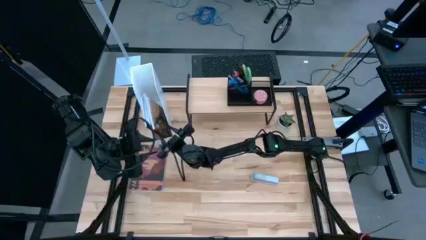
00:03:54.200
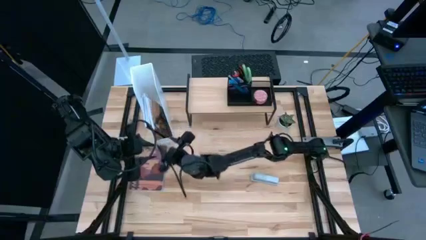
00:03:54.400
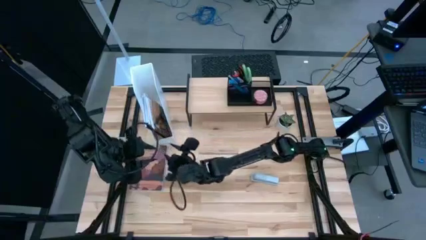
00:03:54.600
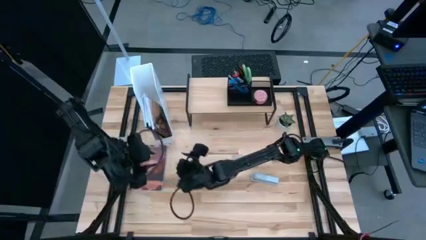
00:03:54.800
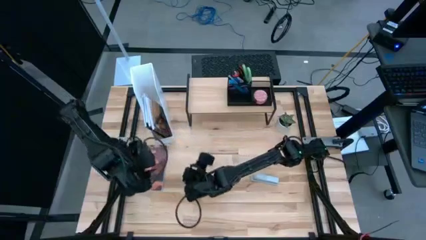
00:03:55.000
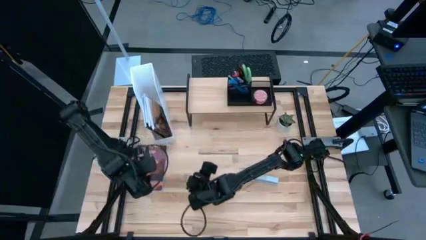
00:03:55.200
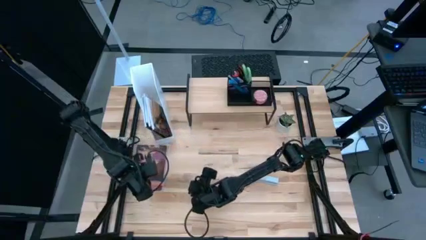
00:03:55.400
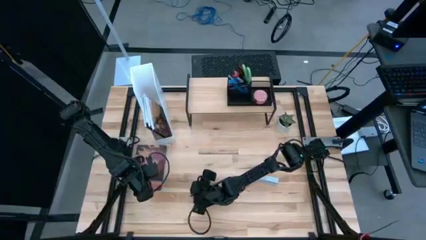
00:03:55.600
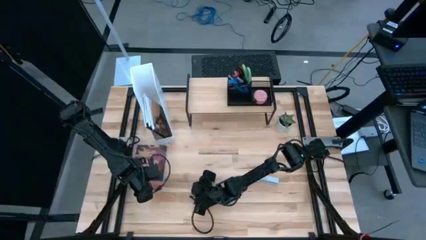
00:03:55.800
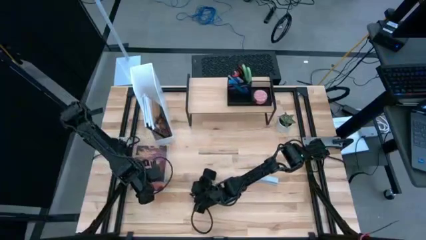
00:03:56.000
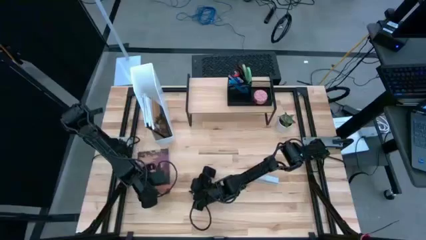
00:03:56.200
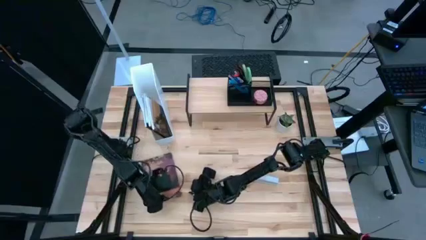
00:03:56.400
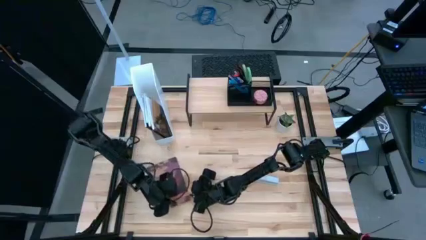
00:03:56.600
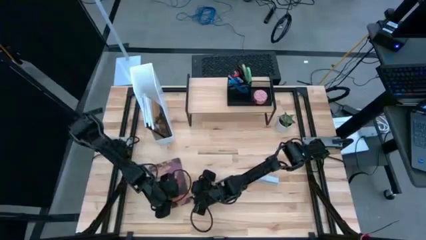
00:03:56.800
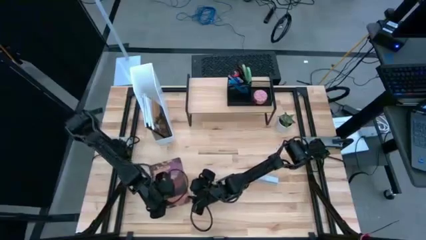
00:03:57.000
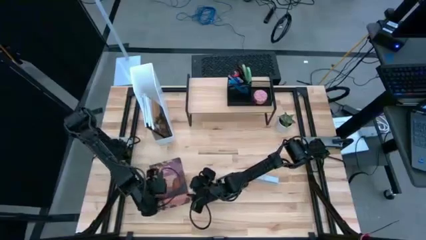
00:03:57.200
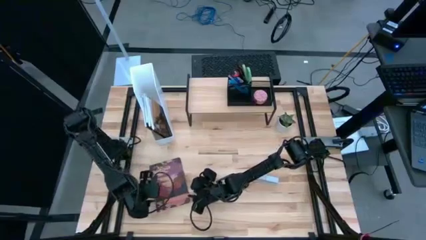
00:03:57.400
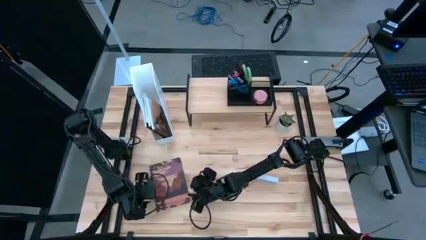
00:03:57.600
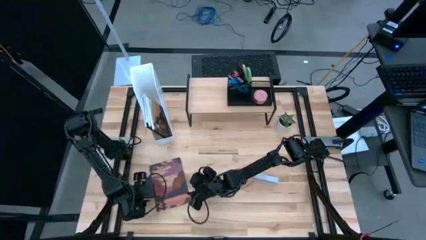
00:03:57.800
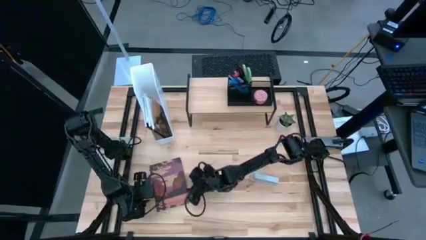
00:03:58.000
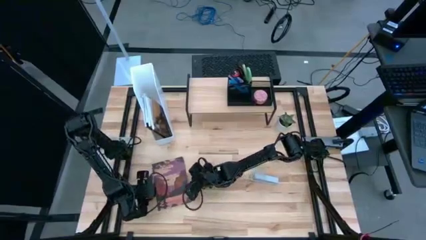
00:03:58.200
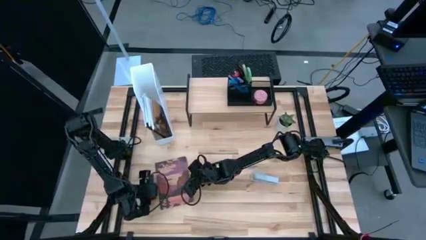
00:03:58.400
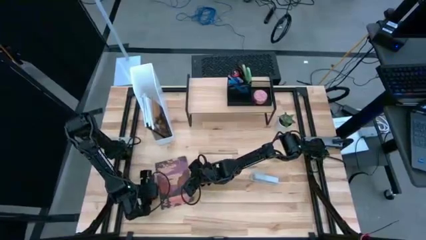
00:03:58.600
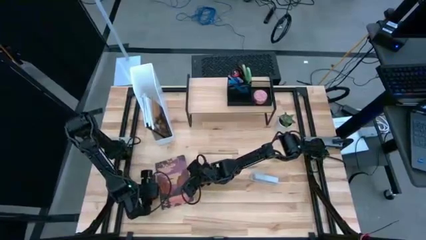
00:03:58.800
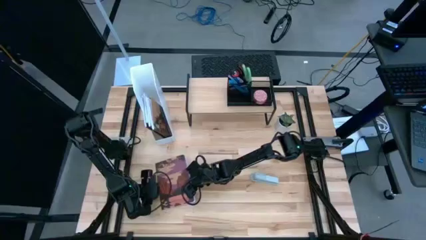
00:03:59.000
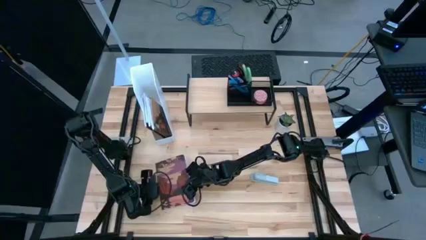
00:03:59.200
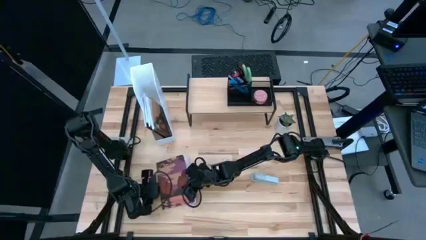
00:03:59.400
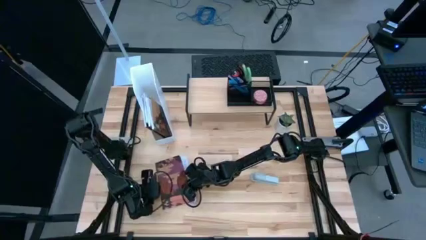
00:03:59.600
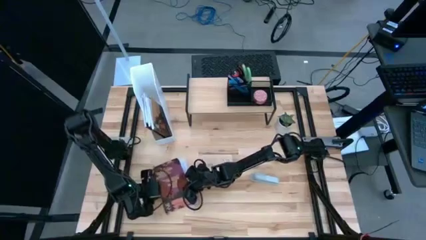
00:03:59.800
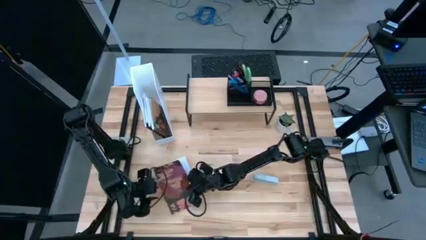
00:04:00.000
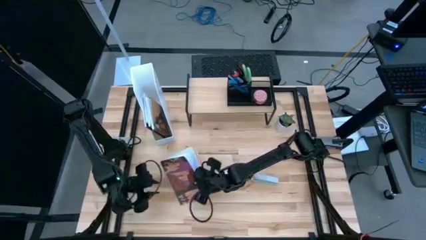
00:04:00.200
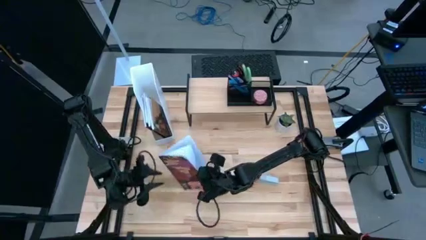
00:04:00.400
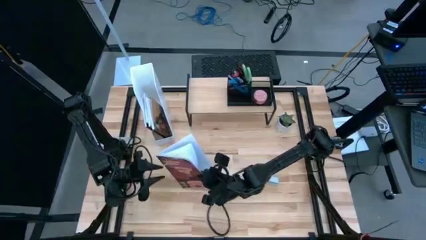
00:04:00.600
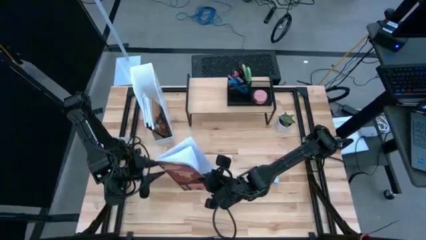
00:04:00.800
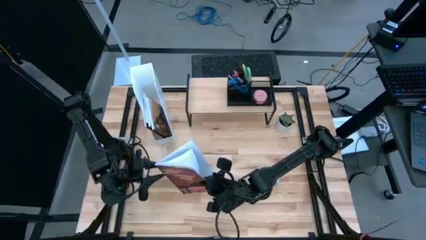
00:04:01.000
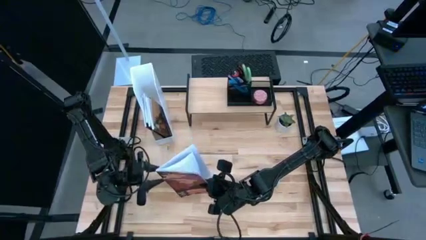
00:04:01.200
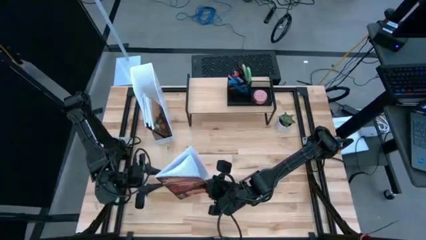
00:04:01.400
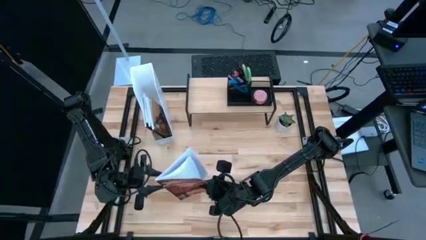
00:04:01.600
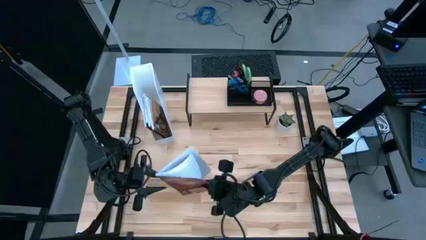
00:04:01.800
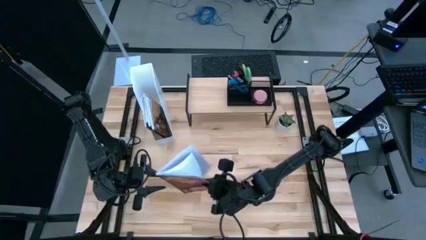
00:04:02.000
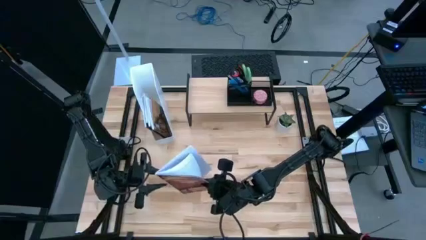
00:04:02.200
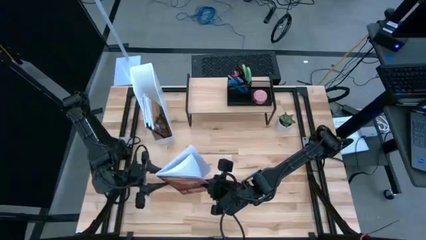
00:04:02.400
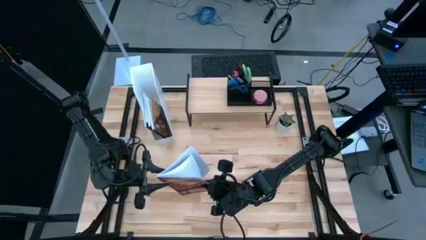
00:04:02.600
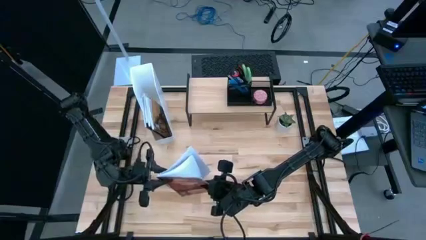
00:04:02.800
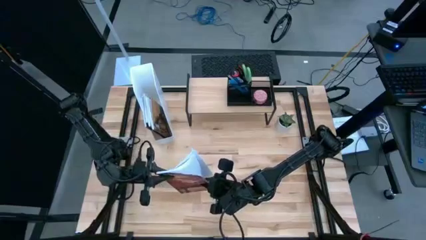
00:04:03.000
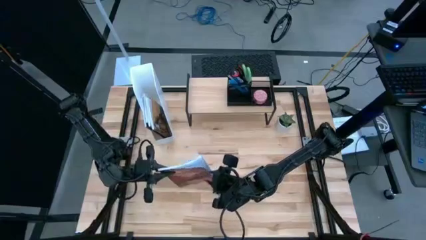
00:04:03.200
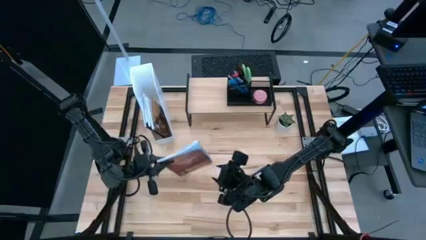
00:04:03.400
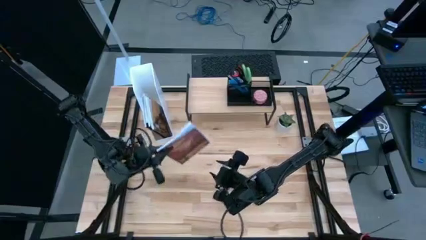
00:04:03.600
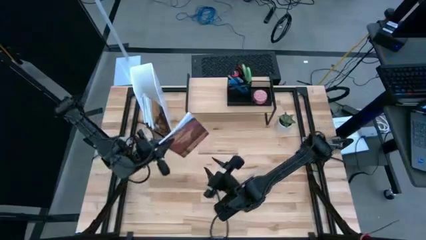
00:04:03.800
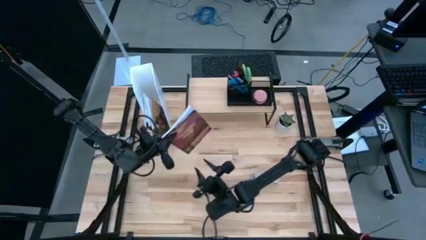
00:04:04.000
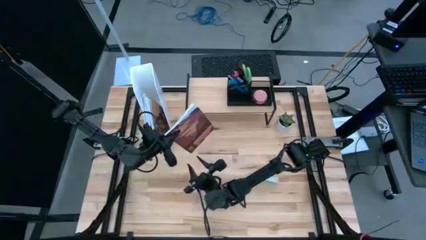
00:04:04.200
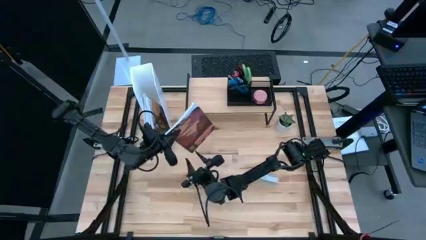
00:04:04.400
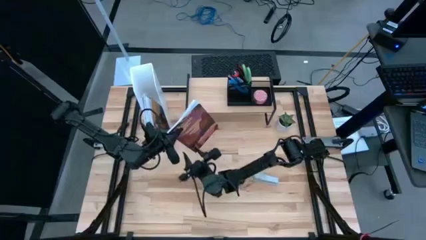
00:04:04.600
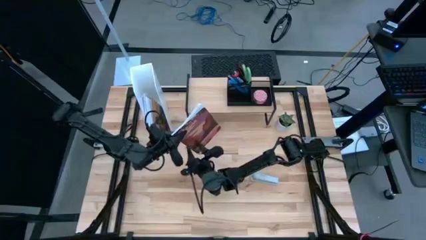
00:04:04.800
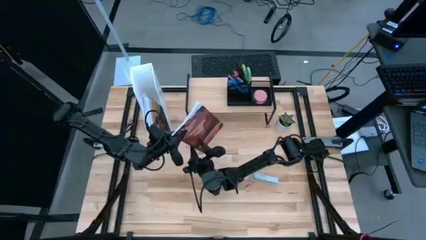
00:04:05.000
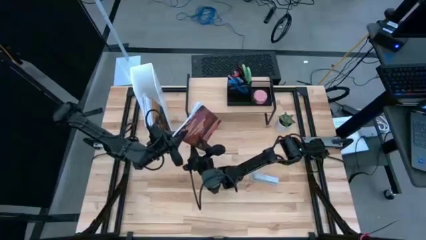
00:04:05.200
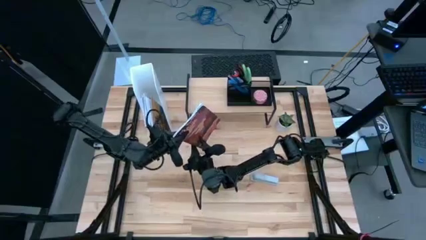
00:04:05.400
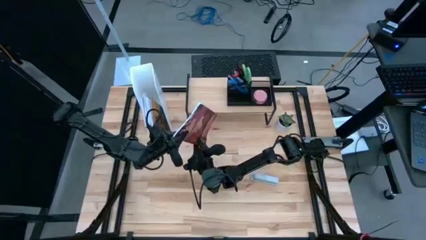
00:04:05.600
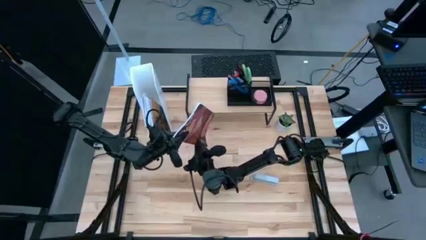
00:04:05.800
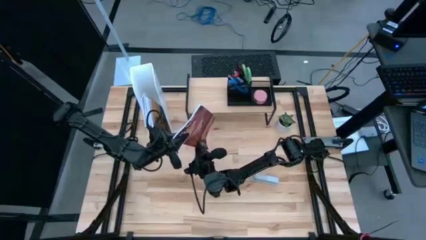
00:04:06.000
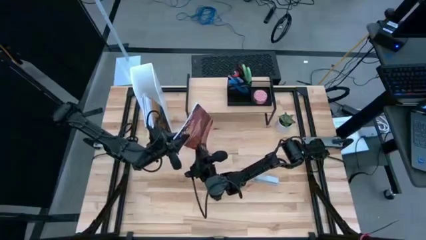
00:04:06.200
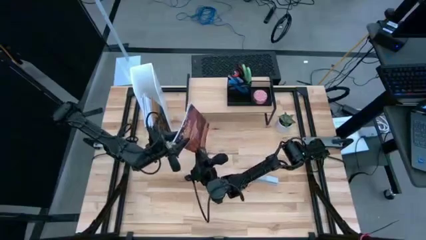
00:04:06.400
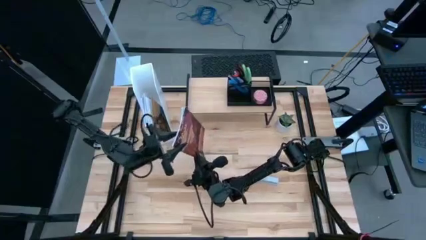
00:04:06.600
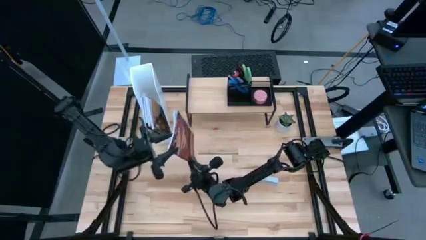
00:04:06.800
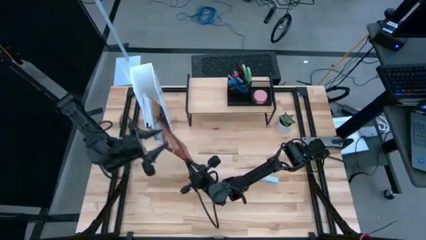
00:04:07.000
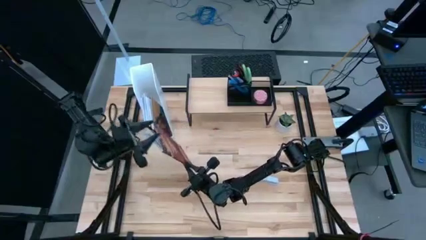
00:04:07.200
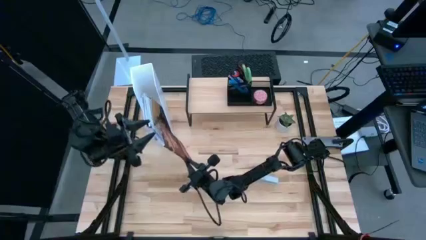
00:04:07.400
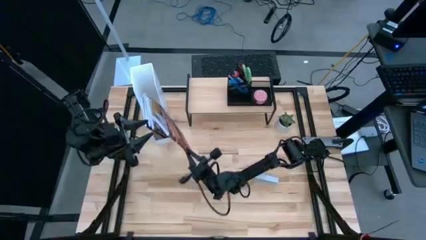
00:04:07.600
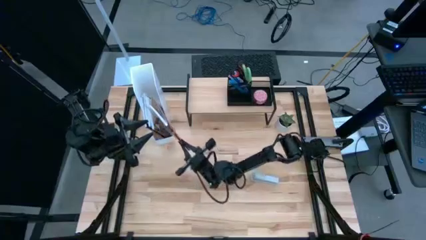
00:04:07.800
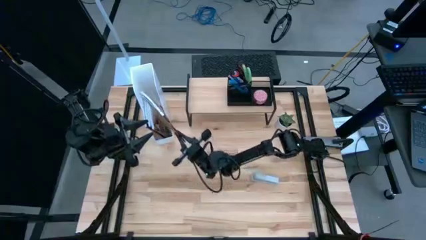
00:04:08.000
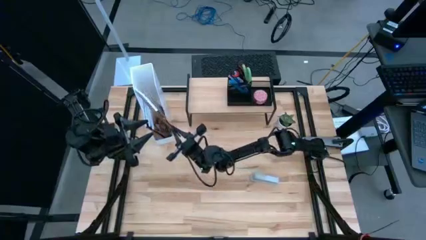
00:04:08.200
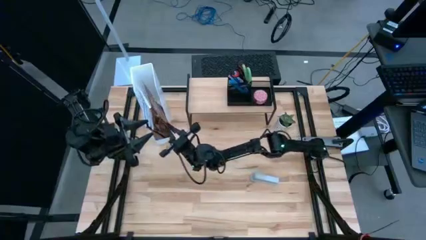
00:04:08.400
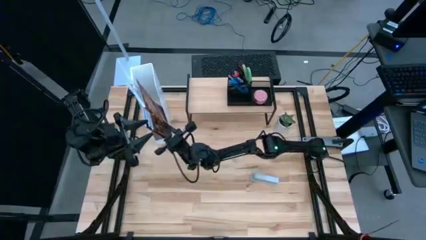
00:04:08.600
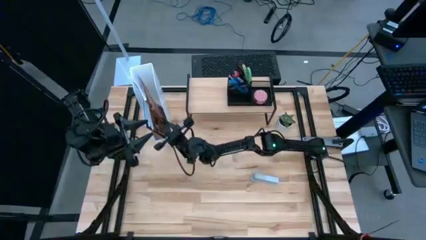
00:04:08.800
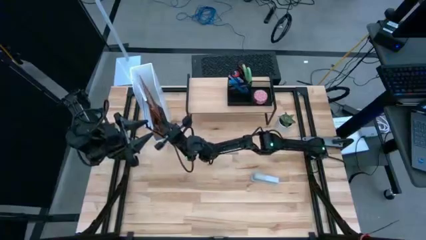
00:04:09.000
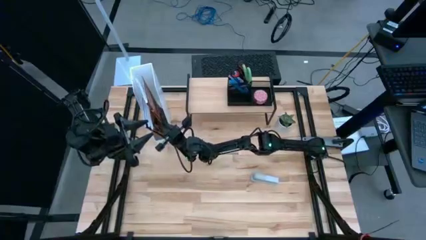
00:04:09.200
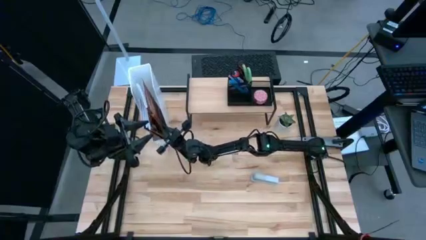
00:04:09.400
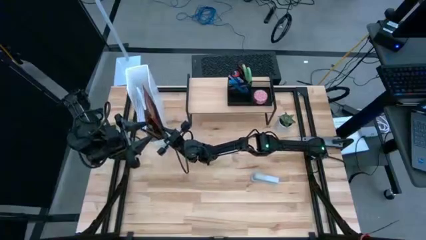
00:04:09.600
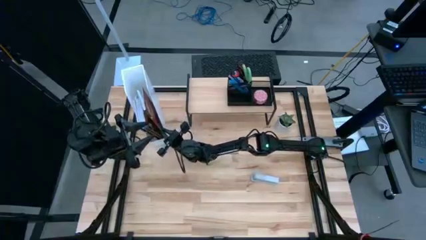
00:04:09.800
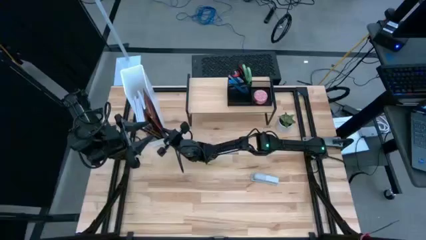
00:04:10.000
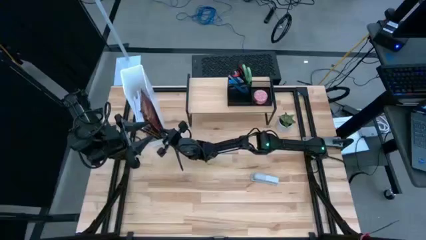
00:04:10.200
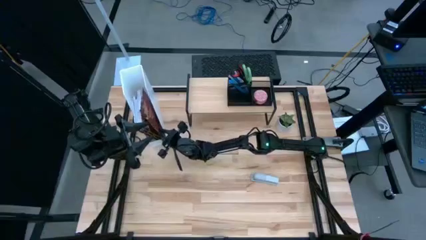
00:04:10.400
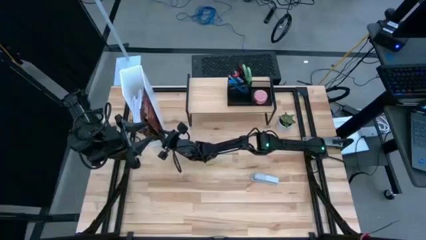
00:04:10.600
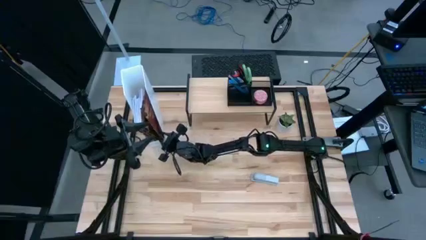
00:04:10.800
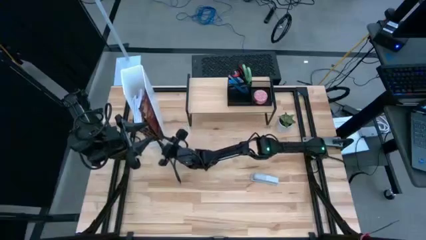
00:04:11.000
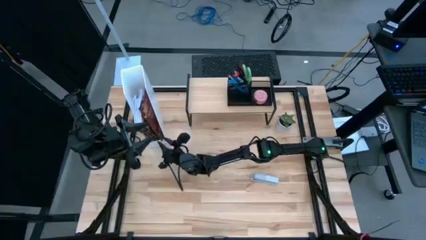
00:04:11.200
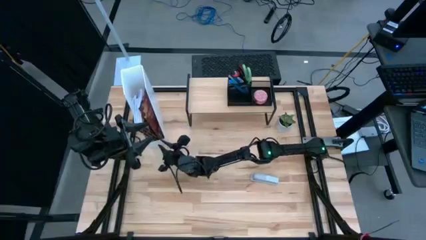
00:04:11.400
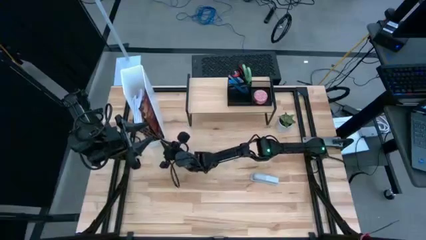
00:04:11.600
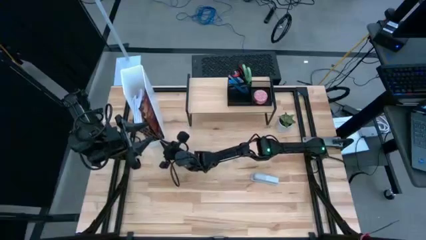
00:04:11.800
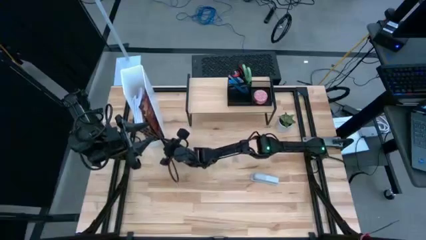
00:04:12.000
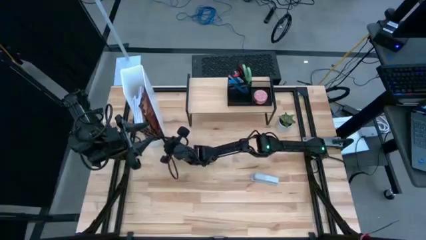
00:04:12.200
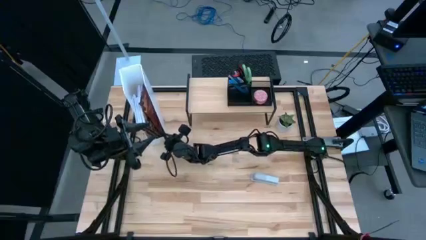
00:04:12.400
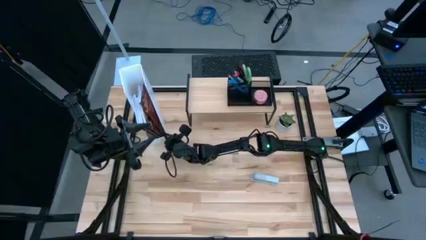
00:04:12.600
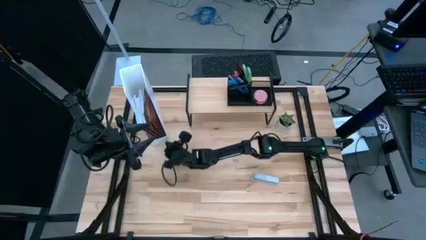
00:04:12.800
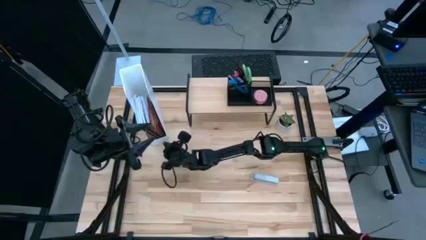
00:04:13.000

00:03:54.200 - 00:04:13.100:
Task: Stock shelves
Put the purple brown book into the white book organizer
